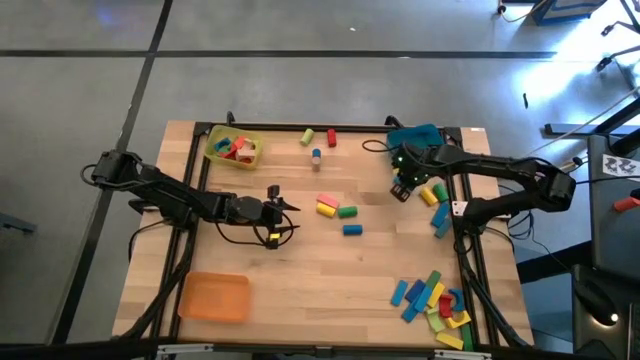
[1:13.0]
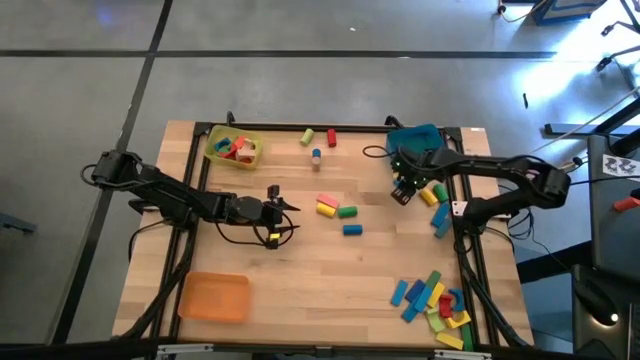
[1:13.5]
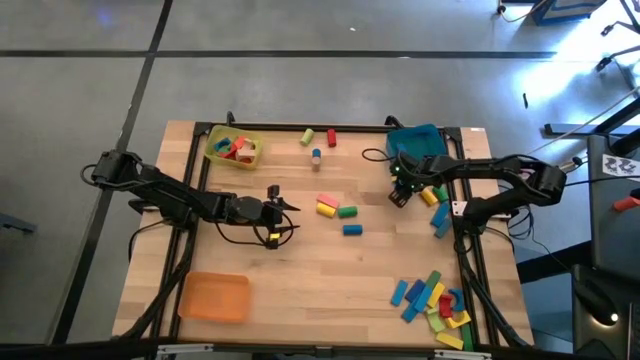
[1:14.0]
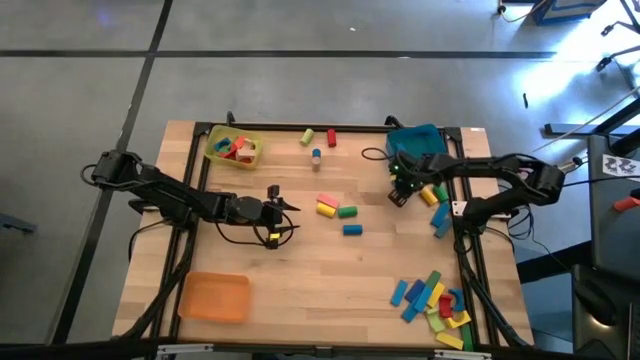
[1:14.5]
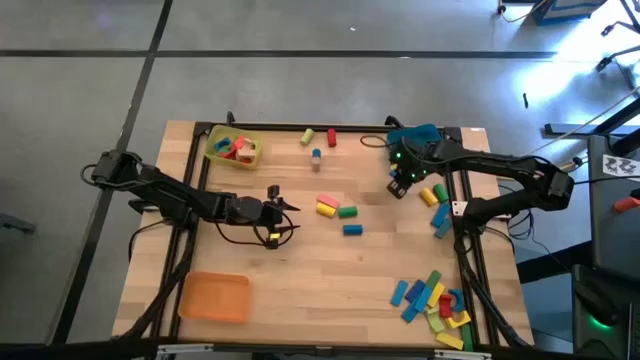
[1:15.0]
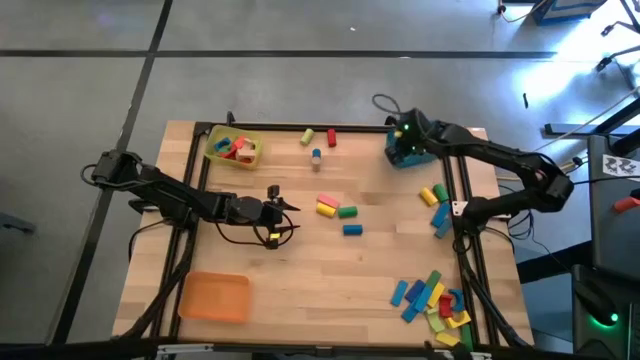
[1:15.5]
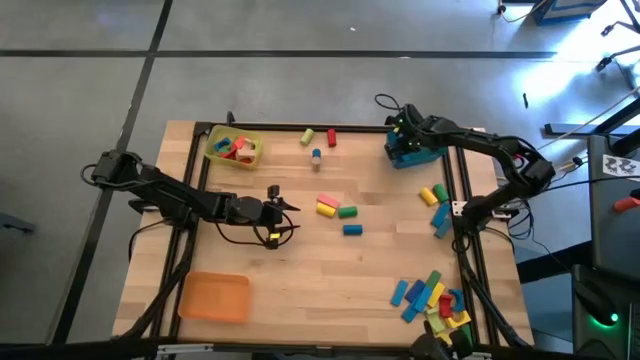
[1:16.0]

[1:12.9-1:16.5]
Task: Sort blocks by size
Put the blue rectangular block into the blue bin

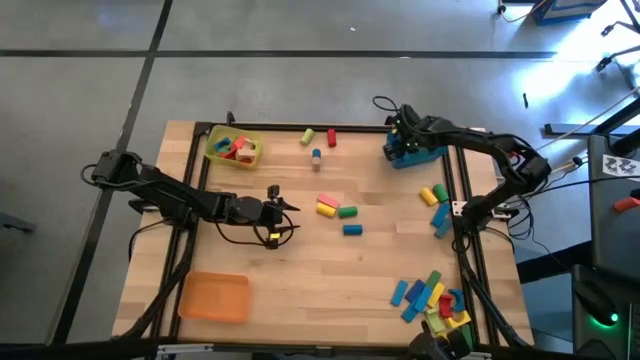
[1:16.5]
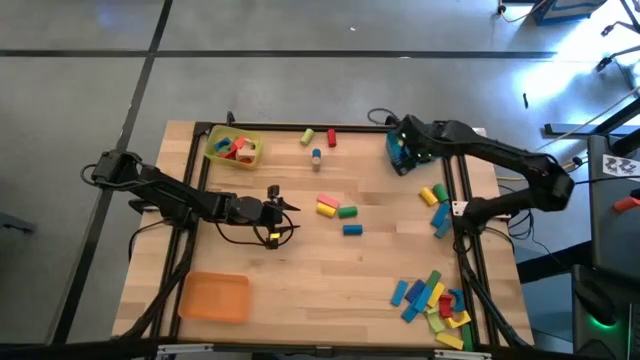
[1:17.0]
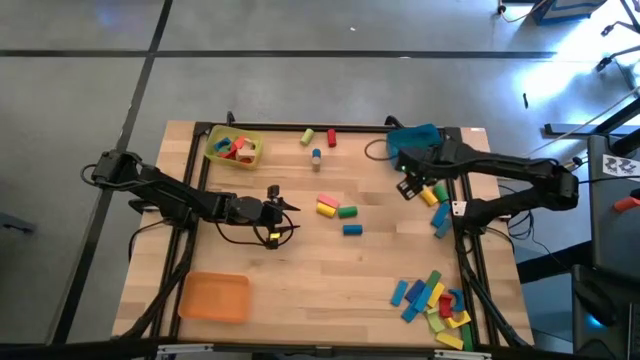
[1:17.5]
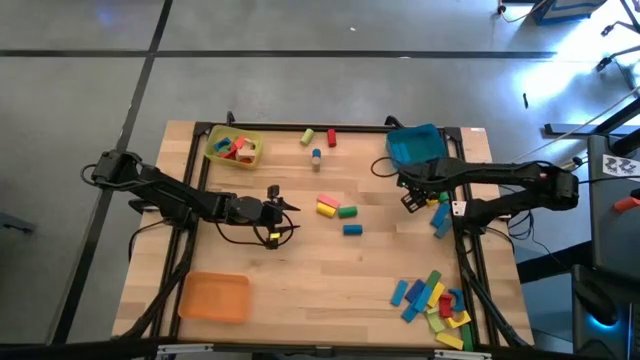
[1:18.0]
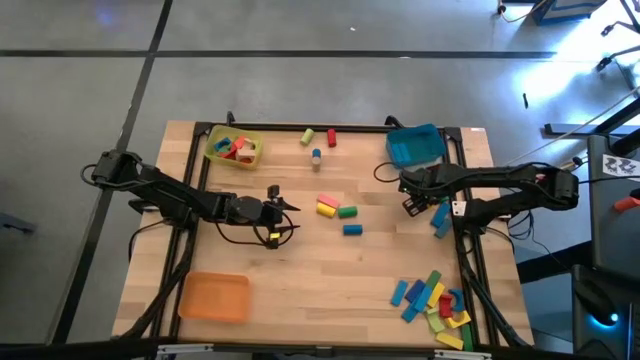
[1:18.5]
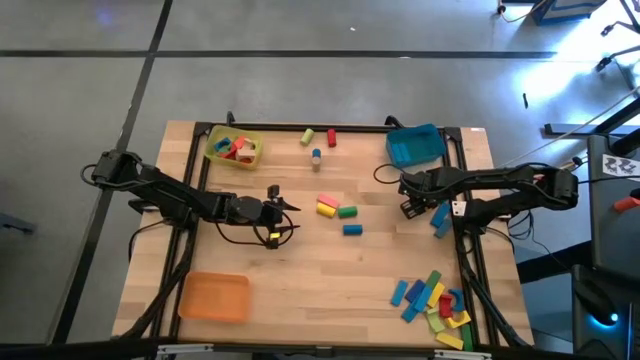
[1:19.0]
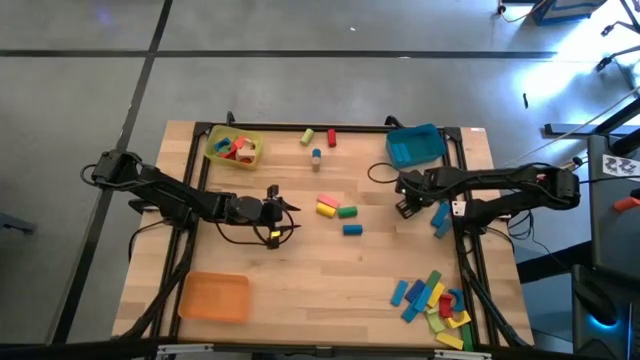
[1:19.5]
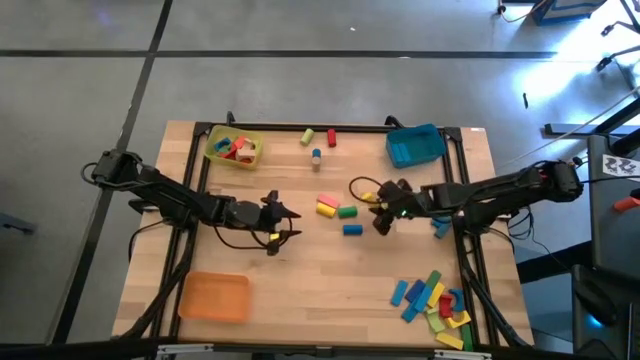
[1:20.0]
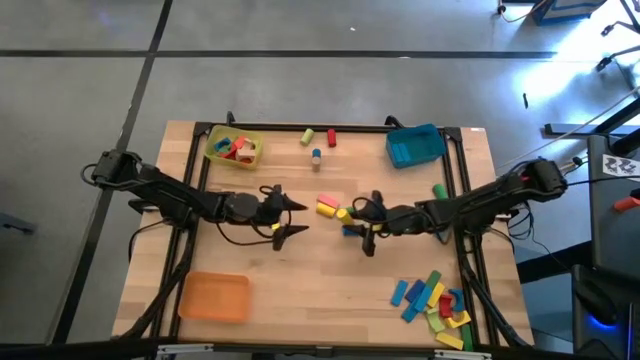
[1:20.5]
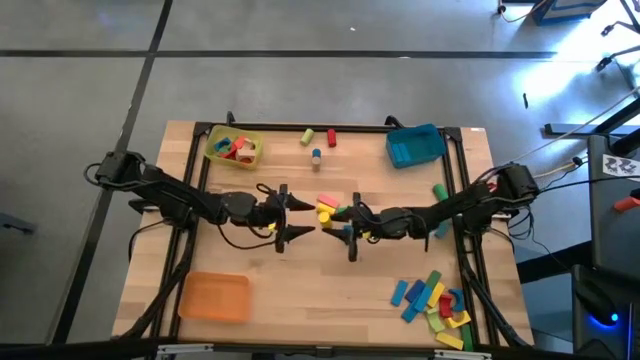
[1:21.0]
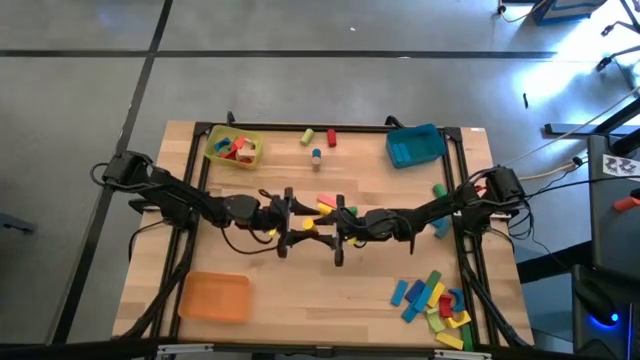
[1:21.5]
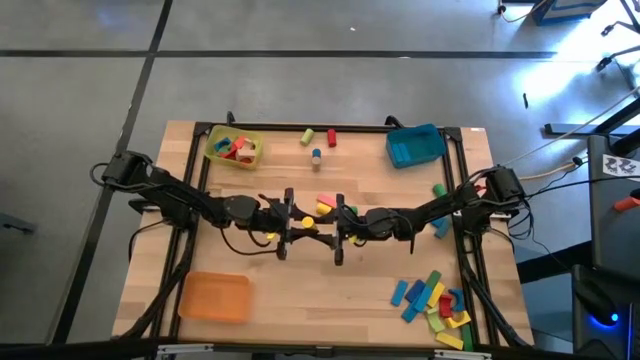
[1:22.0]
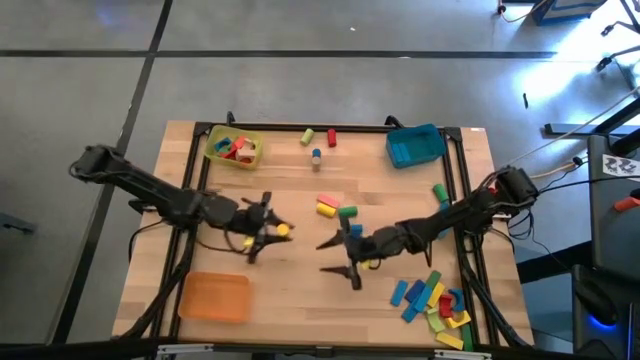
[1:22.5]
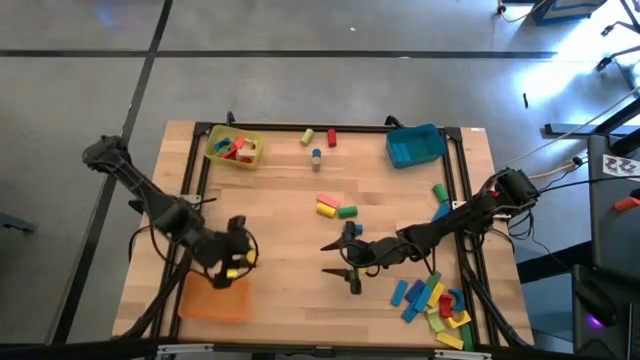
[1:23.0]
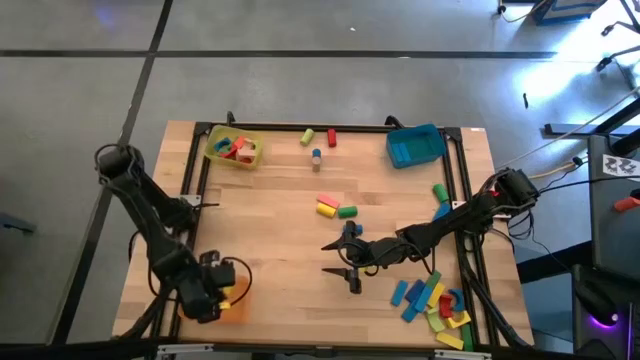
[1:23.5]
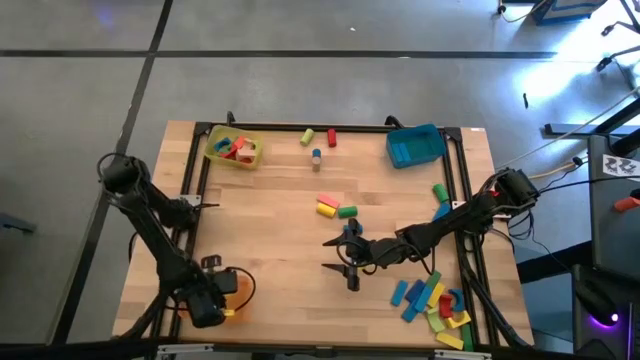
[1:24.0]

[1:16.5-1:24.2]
Put the yellow cylindrical block into the light orange bin

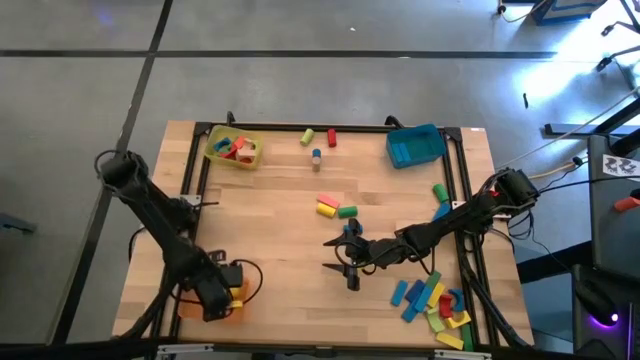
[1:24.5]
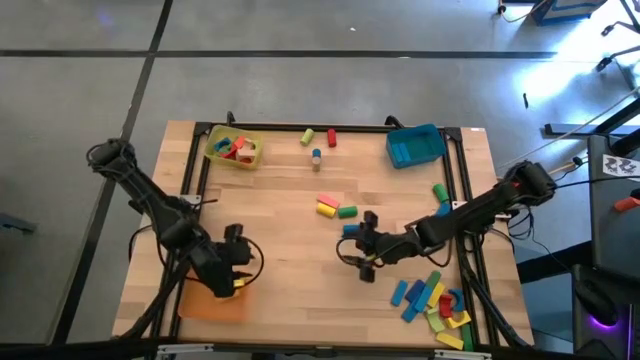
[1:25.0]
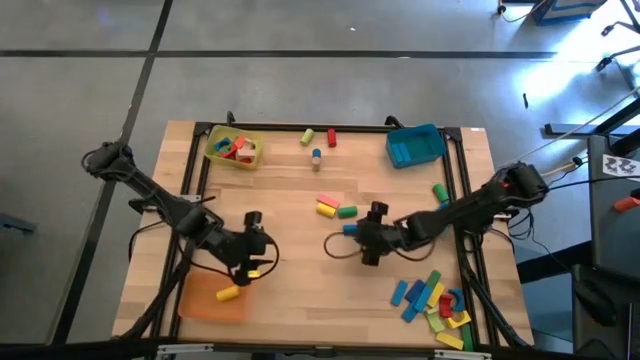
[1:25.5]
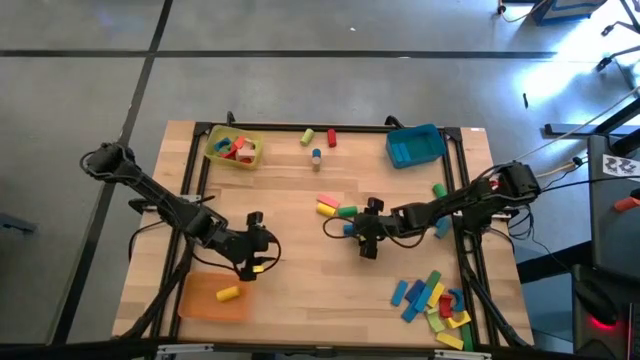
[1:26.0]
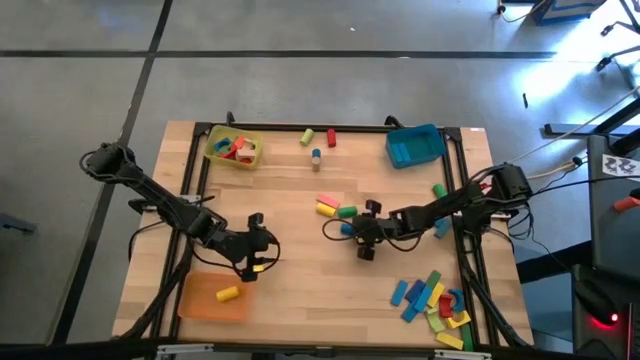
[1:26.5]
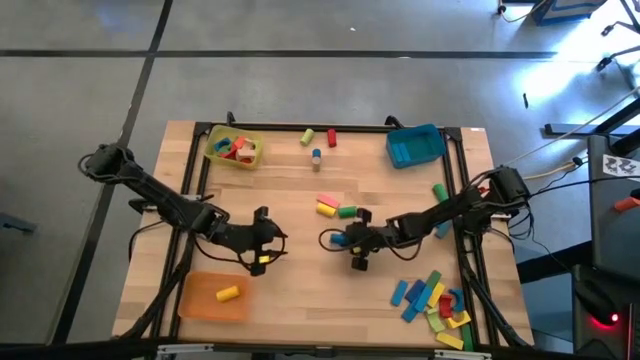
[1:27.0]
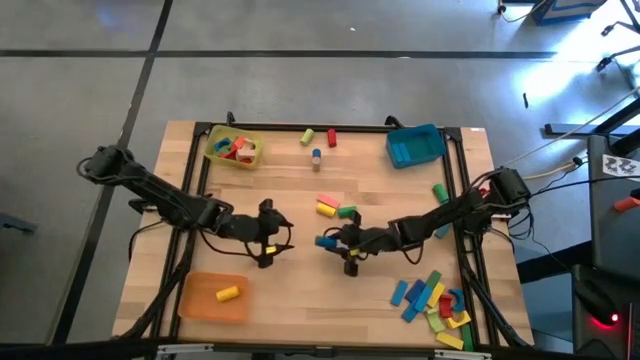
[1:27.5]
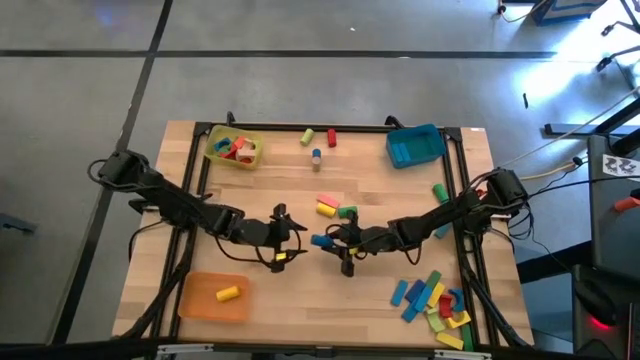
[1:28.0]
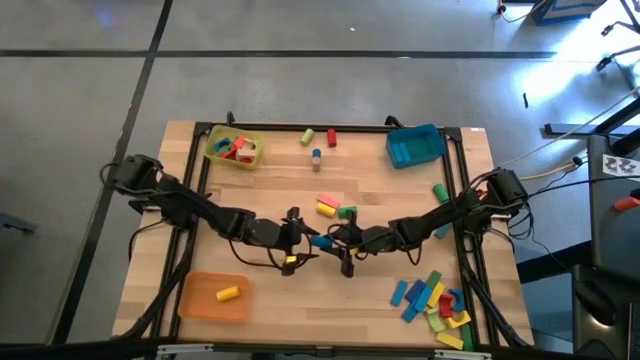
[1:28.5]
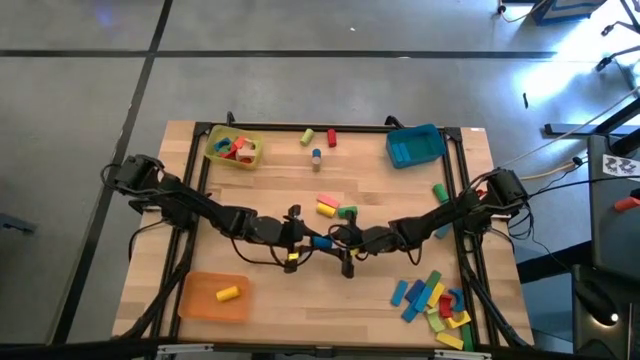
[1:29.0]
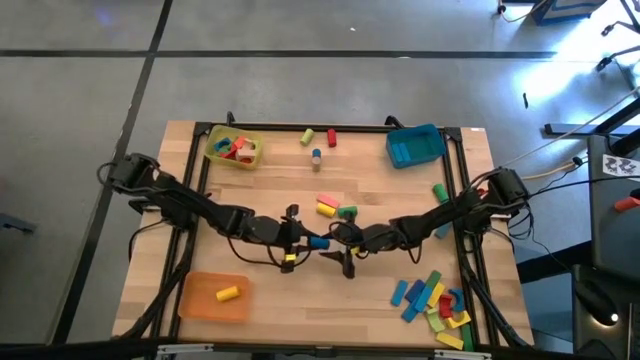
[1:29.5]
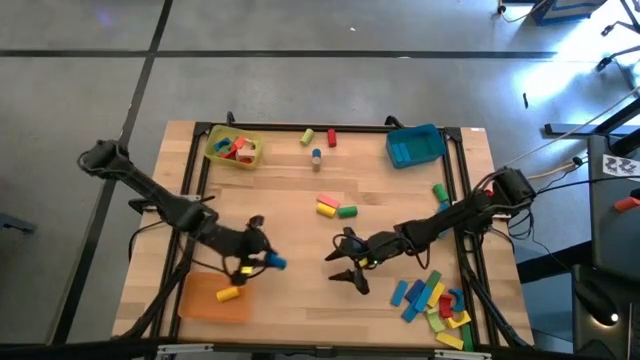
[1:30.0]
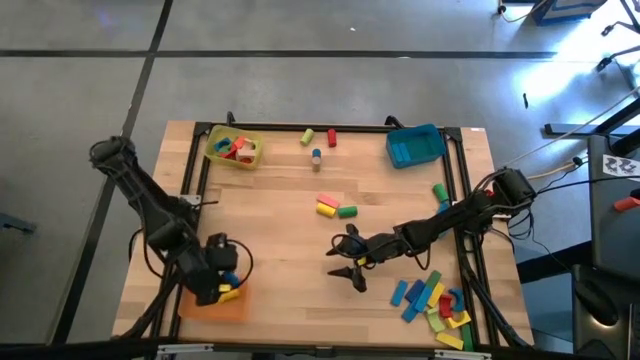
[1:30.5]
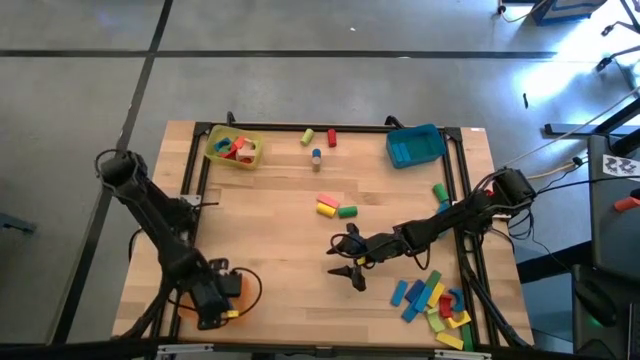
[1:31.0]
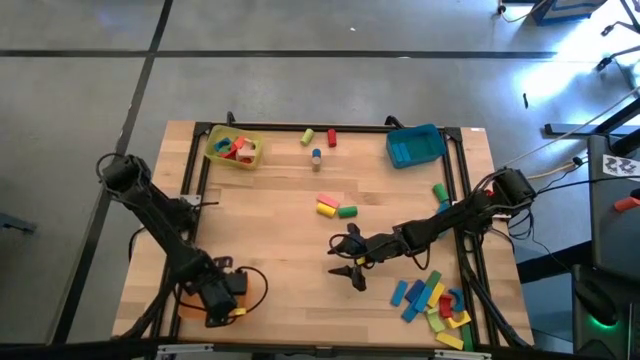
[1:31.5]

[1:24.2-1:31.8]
Put the blue cylindrical block into the light orange bin
